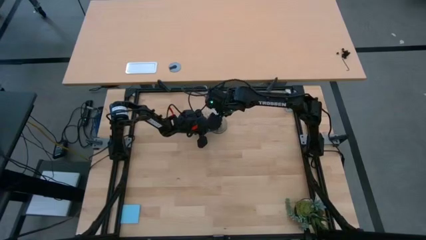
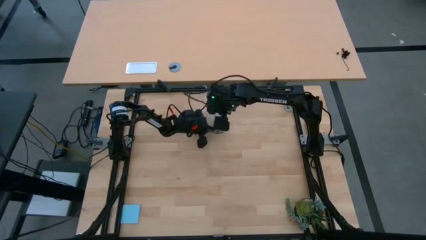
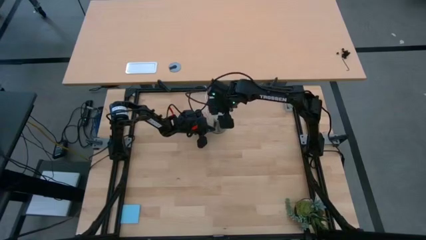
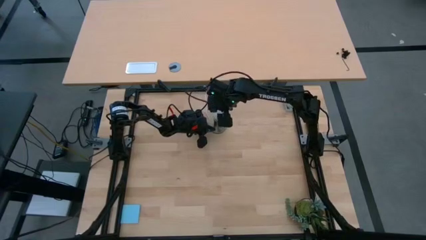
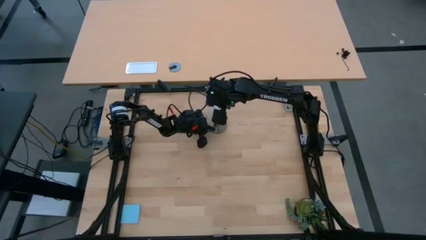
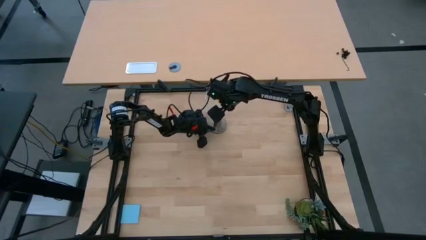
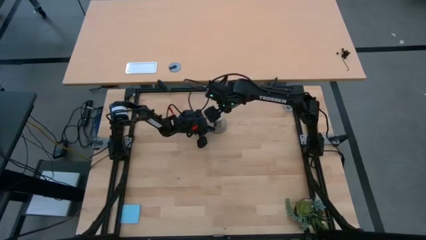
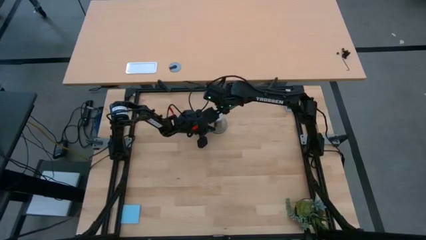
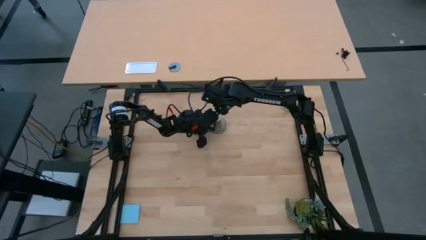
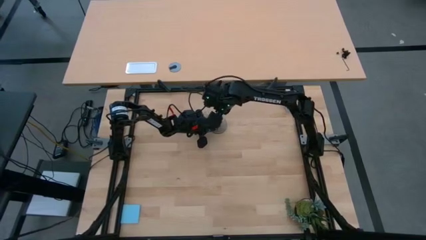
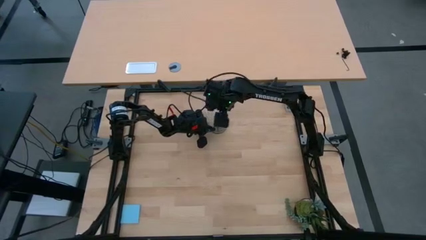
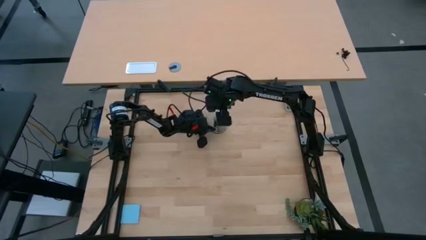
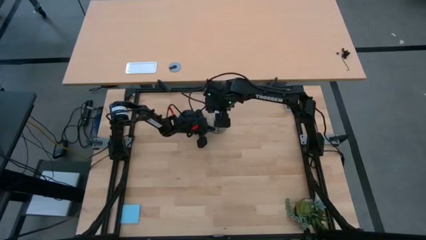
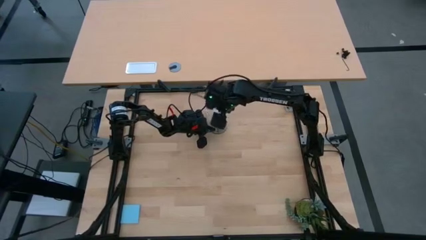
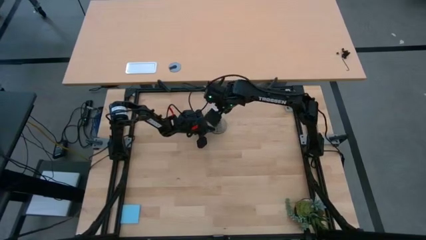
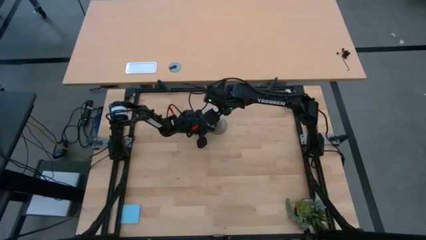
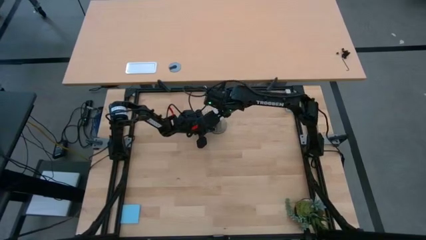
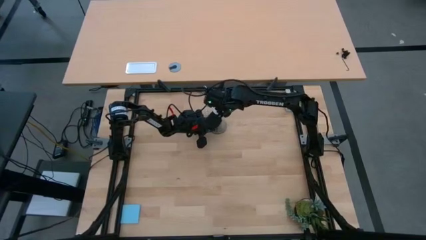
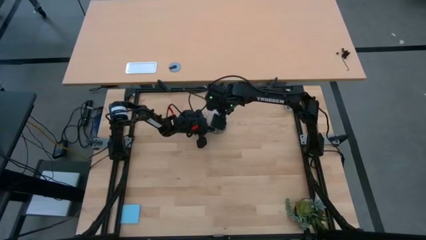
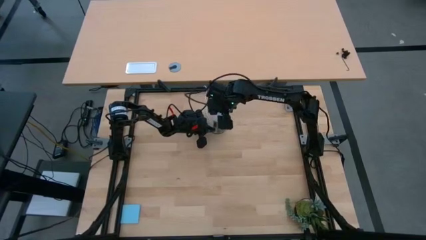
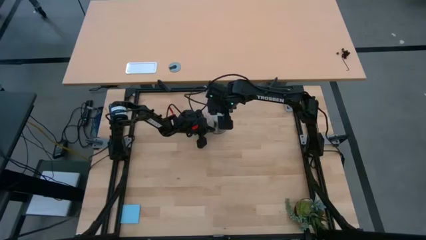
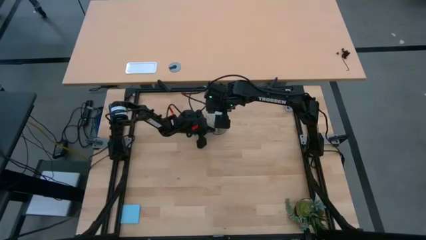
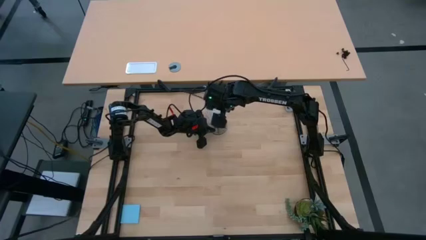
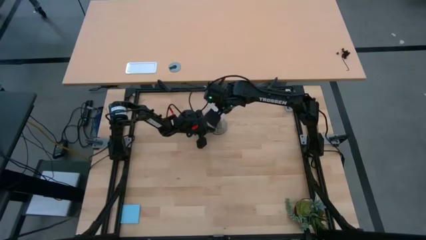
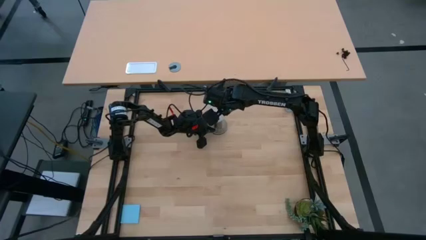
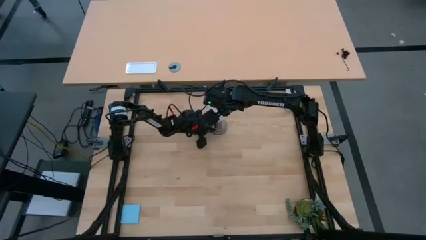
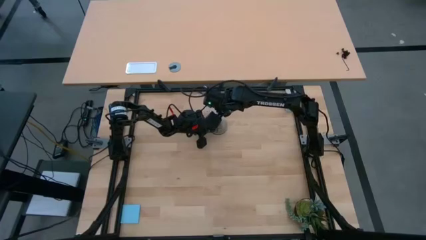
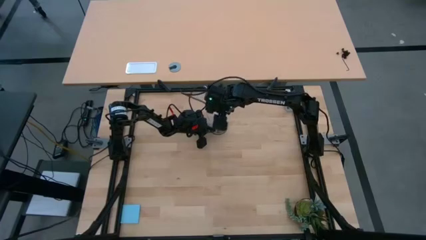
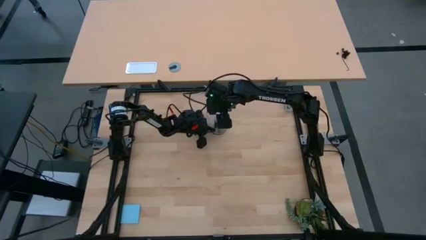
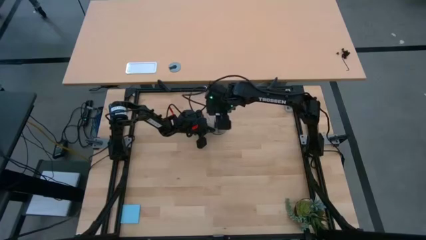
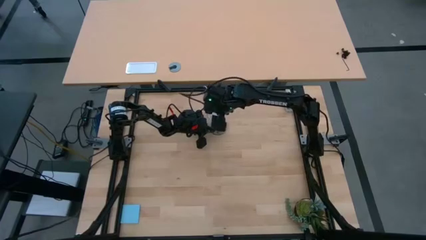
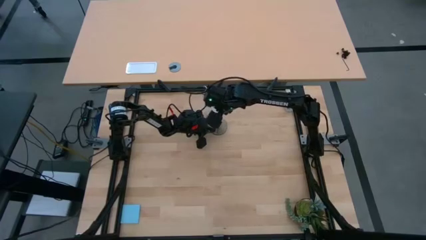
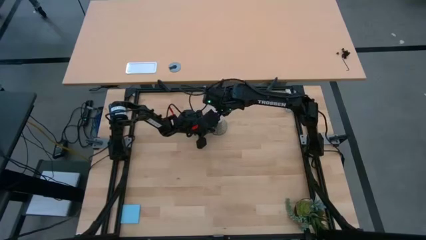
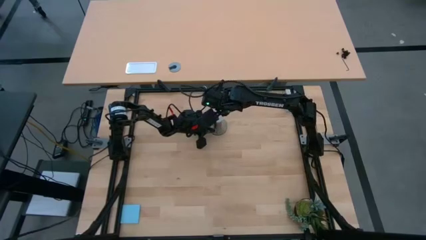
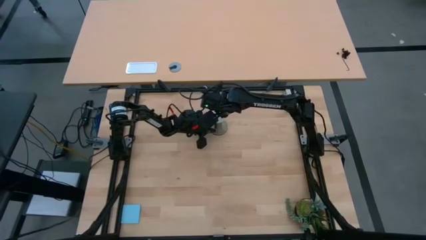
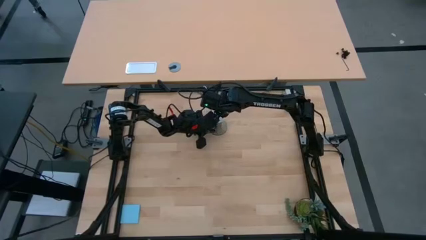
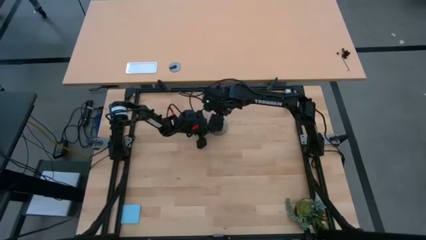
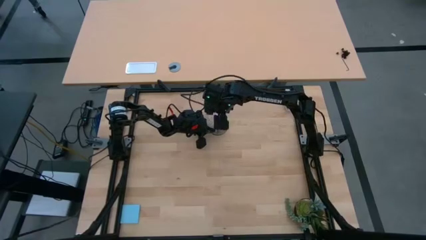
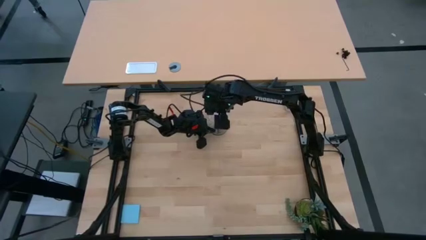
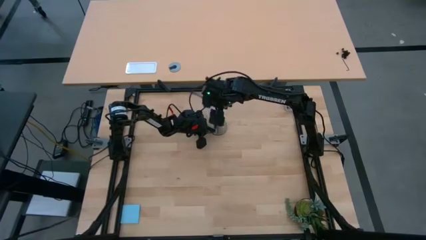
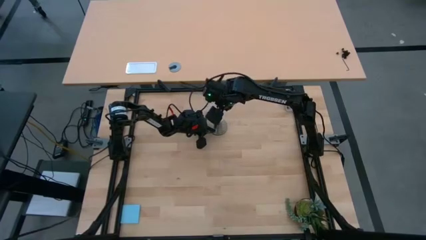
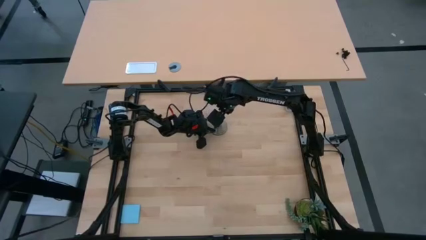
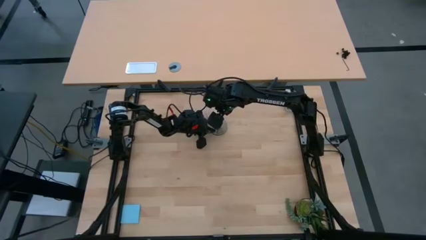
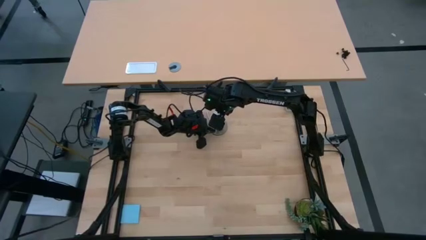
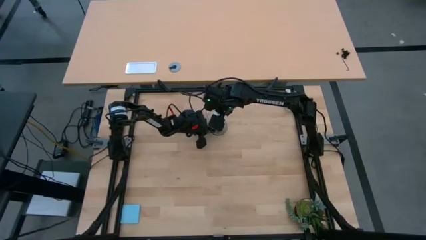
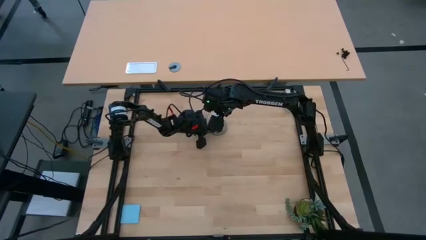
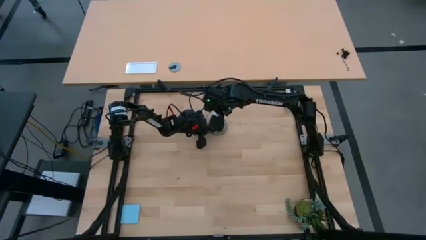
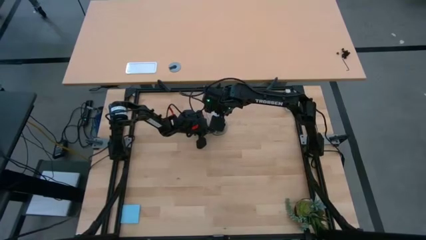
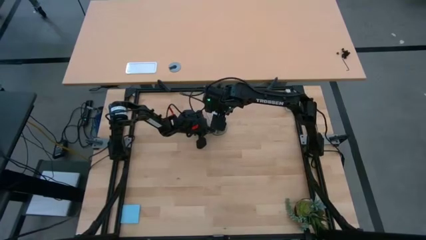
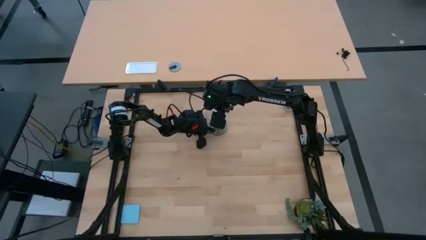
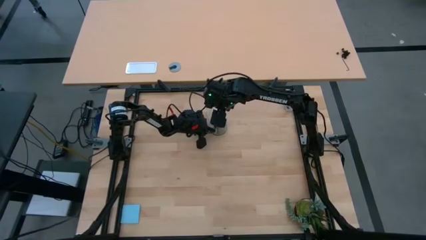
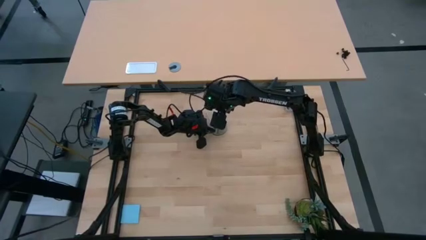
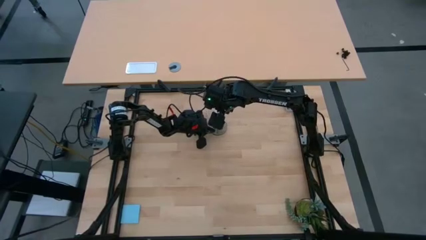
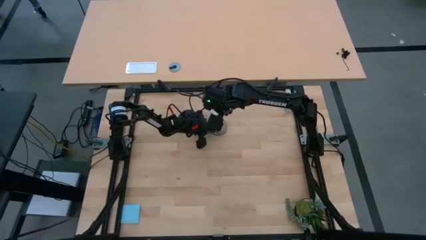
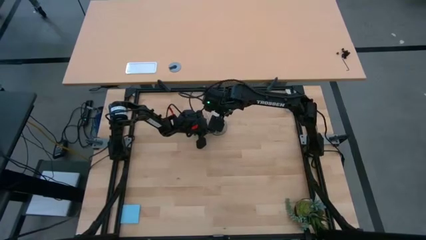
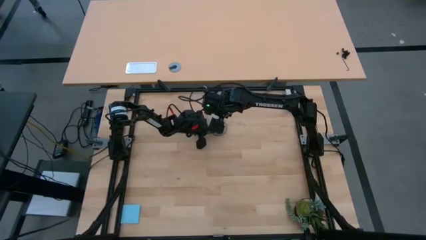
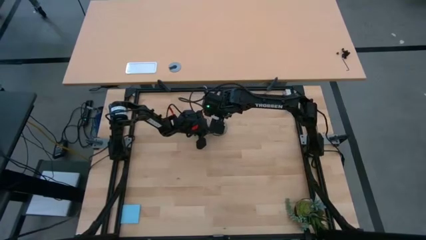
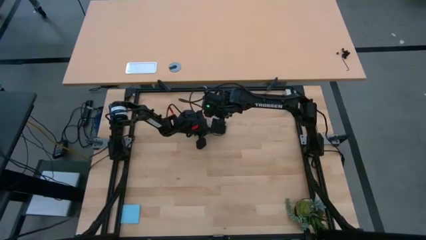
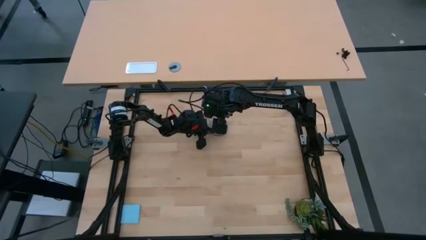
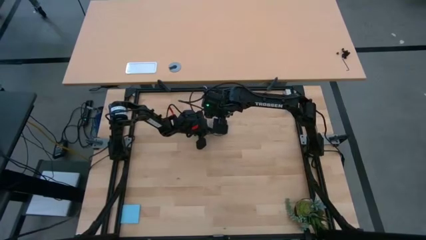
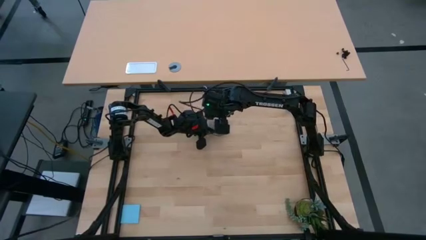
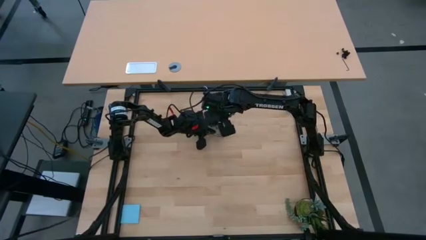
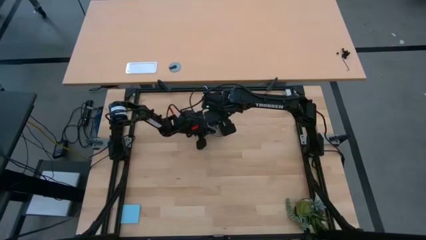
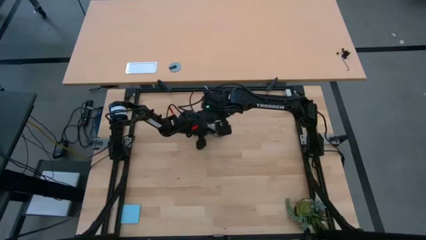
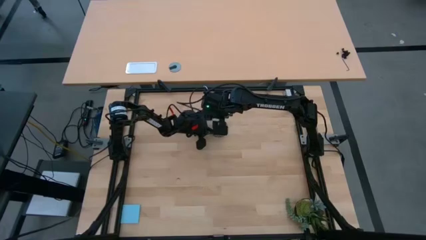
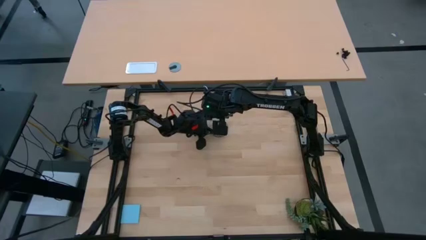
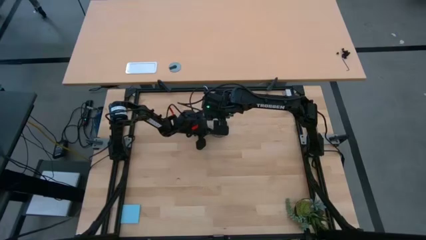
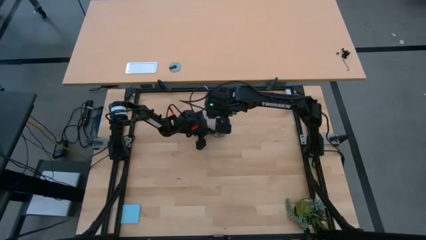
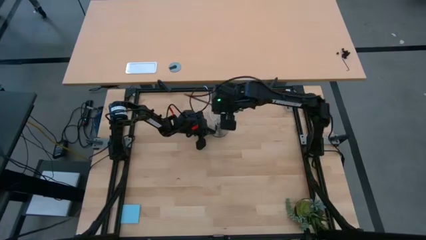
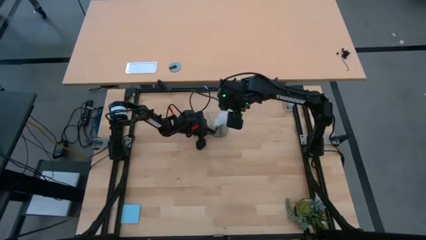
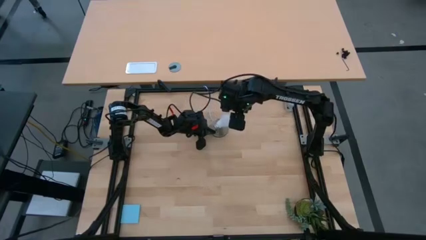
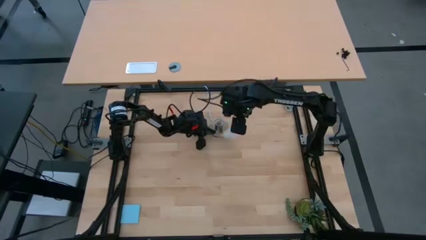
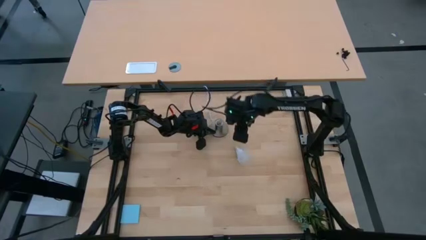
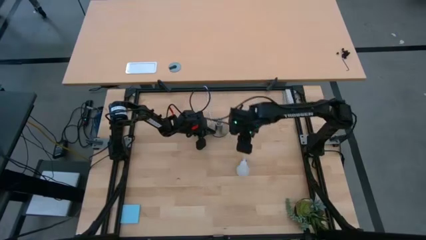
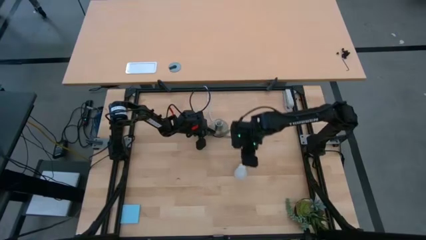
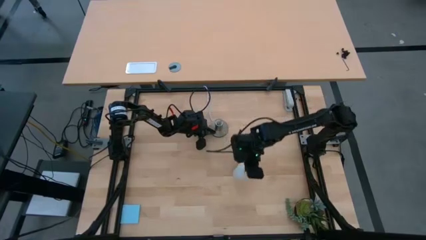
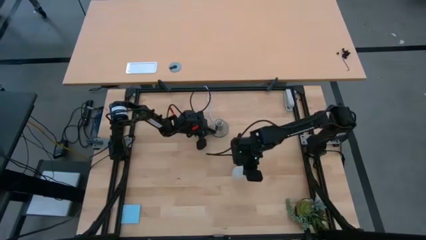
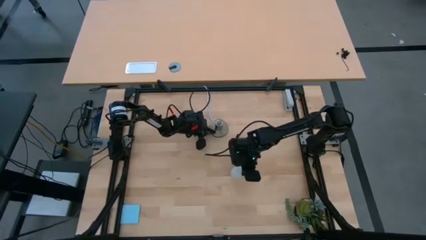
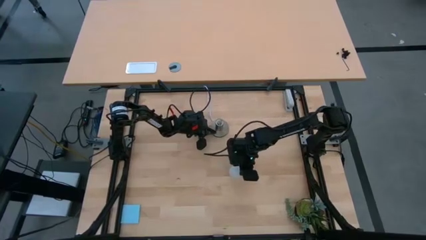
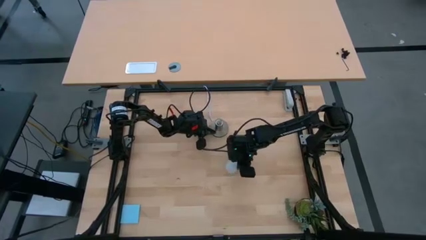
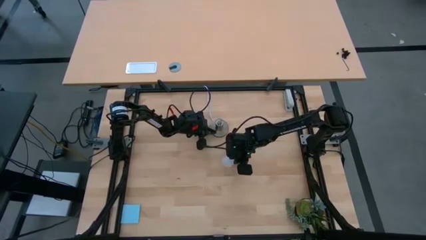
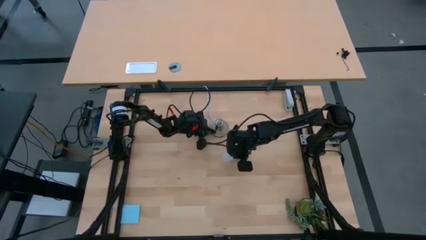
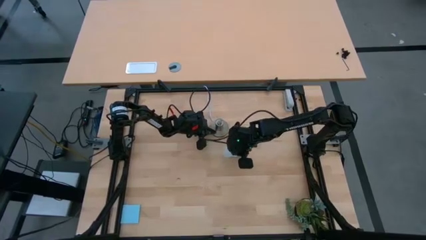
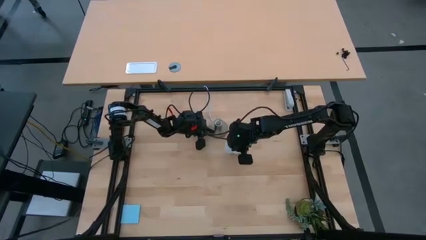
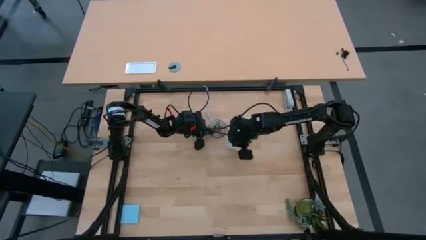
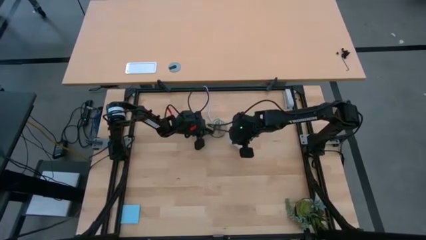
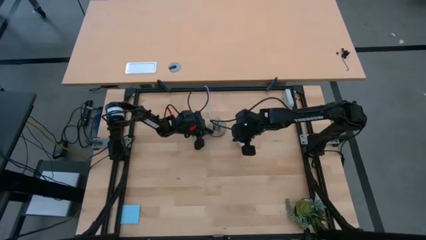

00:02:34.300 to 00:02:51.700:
Task: Screw lightbulb
Remove the light bulb from the table lamp holder
